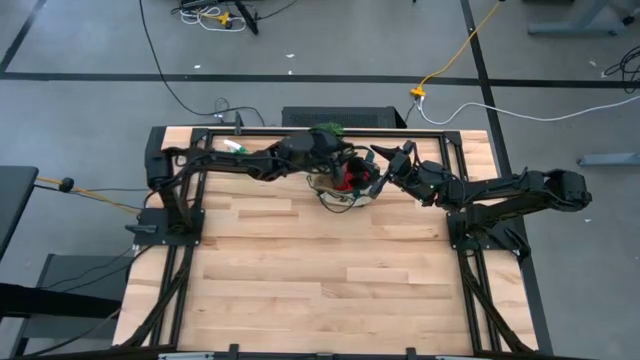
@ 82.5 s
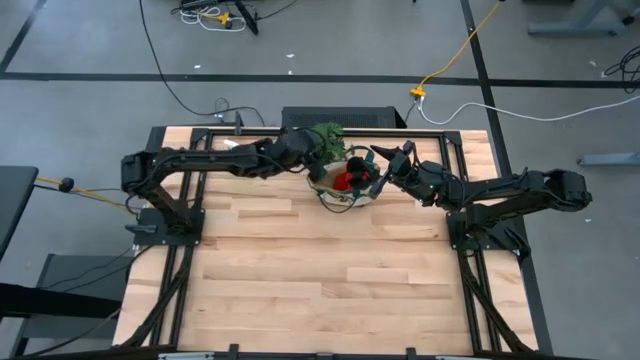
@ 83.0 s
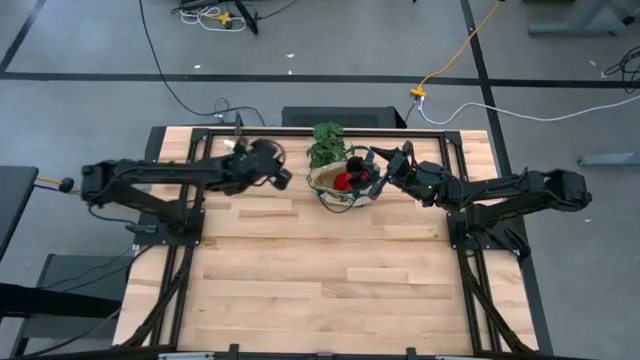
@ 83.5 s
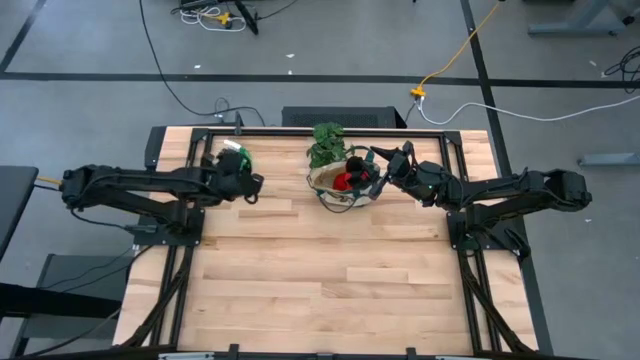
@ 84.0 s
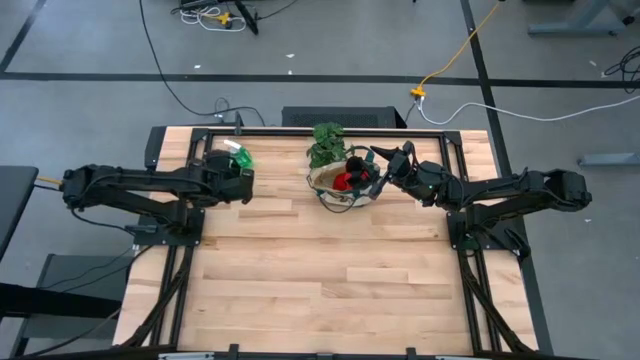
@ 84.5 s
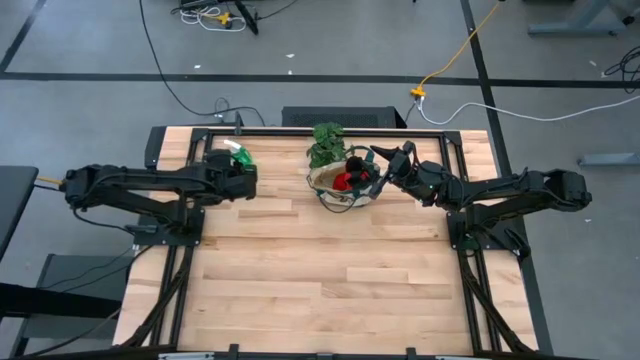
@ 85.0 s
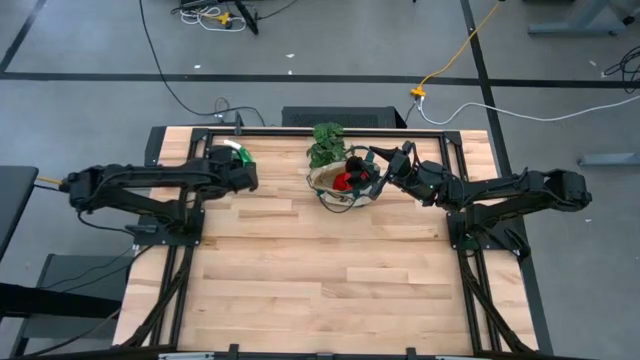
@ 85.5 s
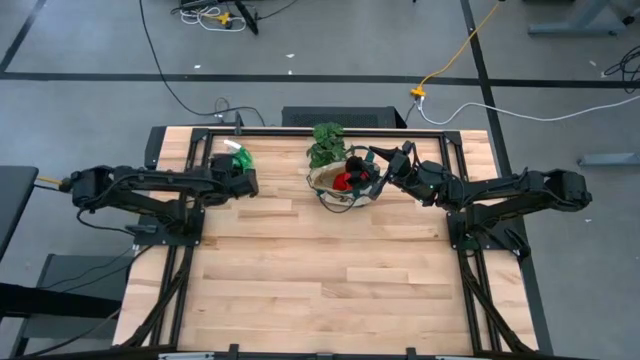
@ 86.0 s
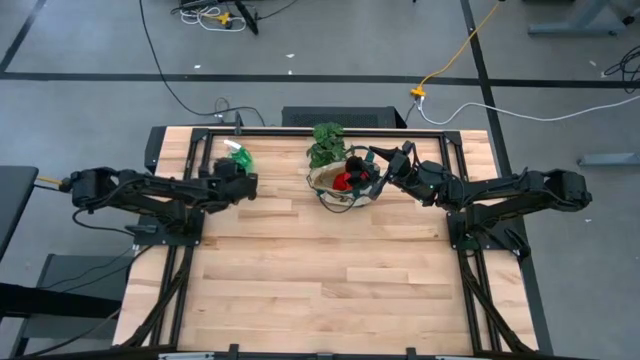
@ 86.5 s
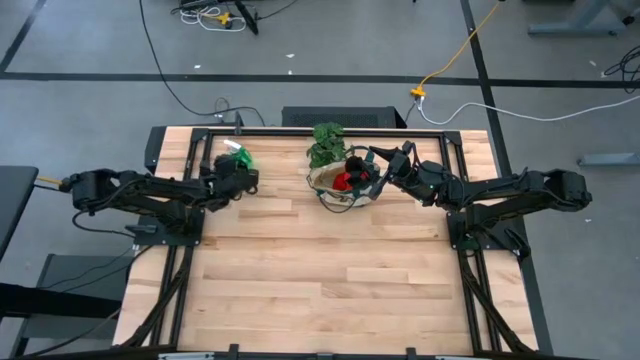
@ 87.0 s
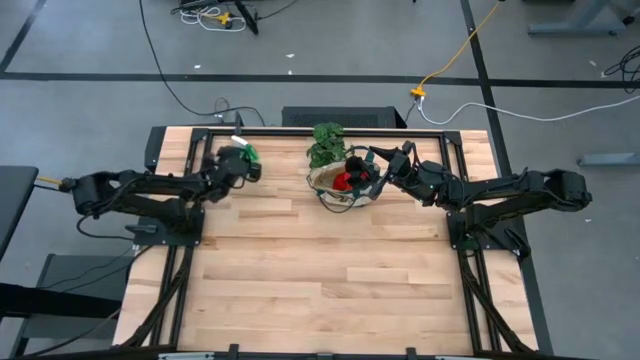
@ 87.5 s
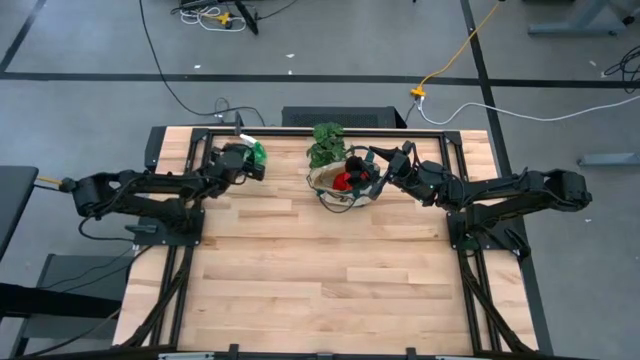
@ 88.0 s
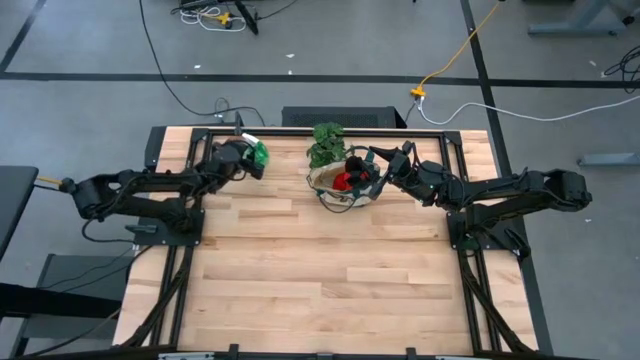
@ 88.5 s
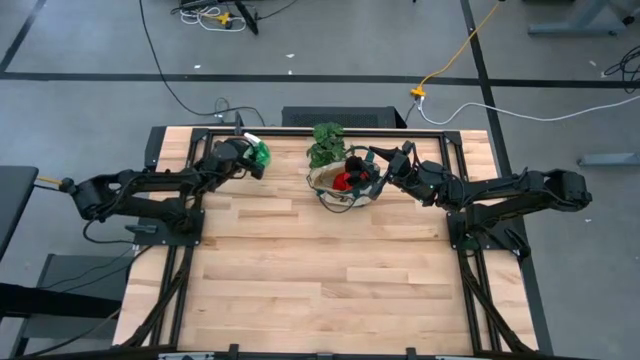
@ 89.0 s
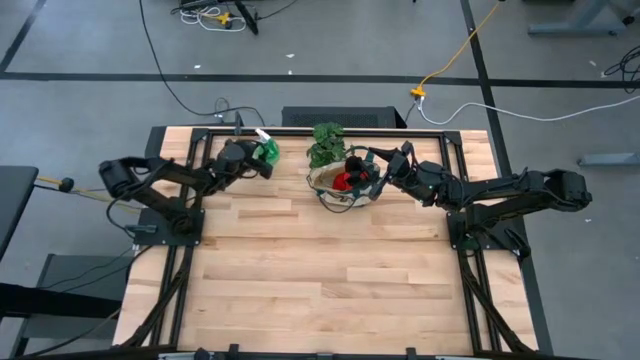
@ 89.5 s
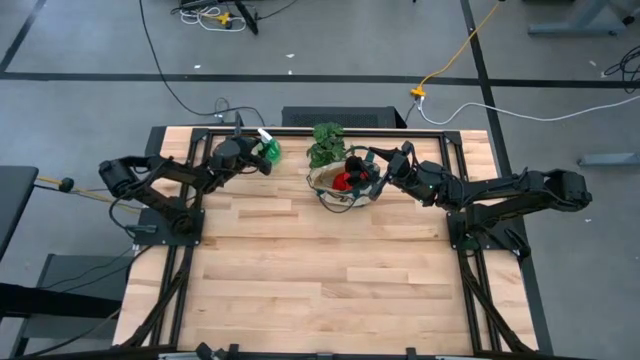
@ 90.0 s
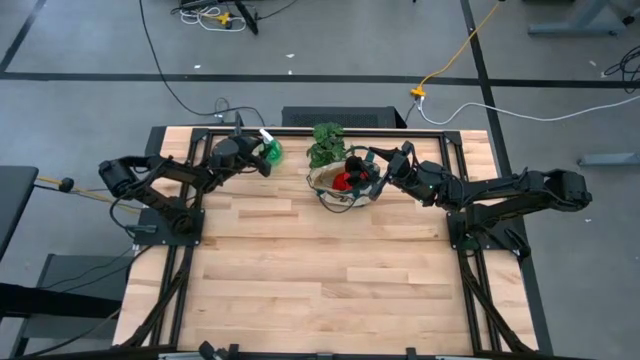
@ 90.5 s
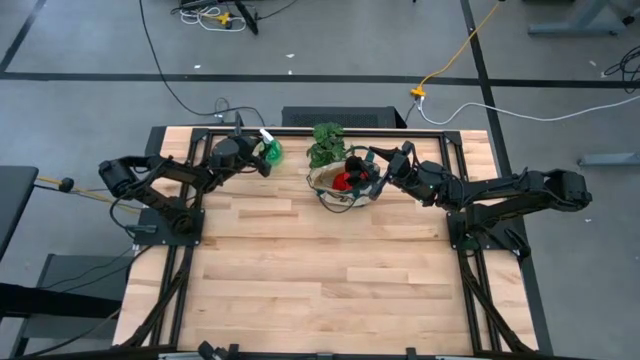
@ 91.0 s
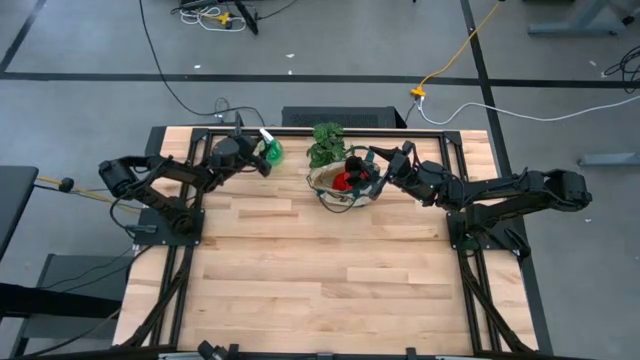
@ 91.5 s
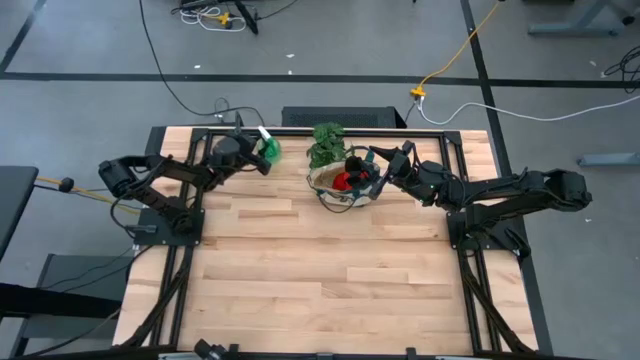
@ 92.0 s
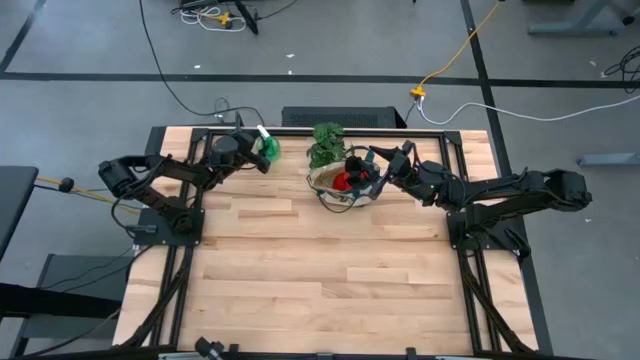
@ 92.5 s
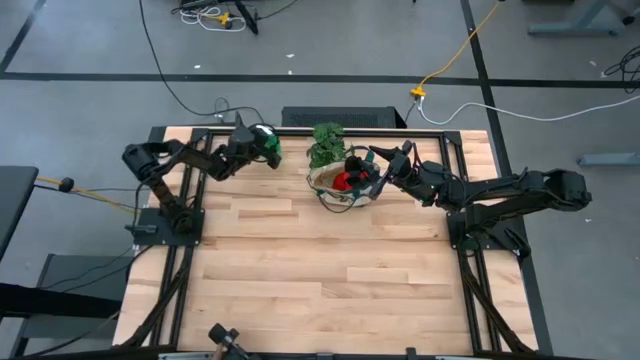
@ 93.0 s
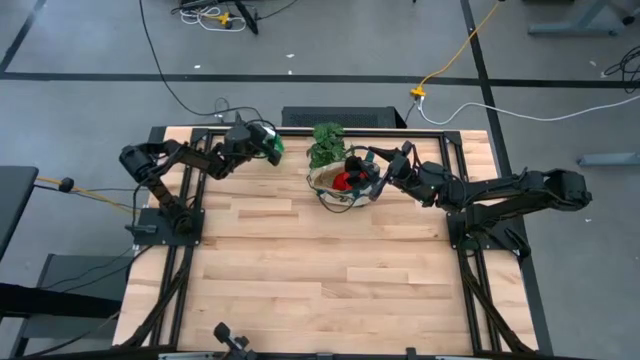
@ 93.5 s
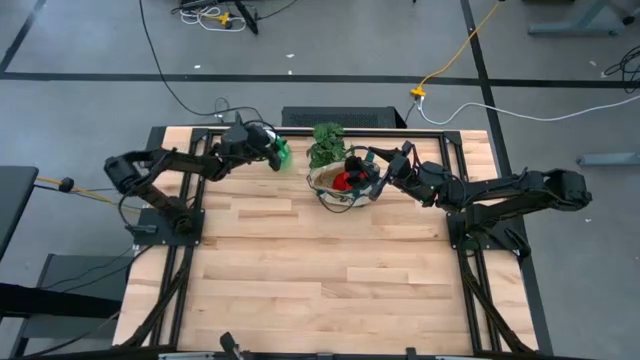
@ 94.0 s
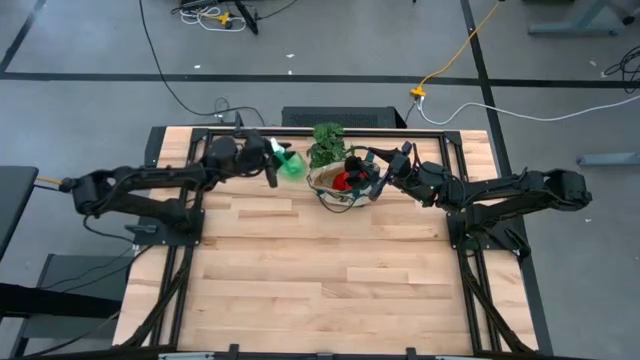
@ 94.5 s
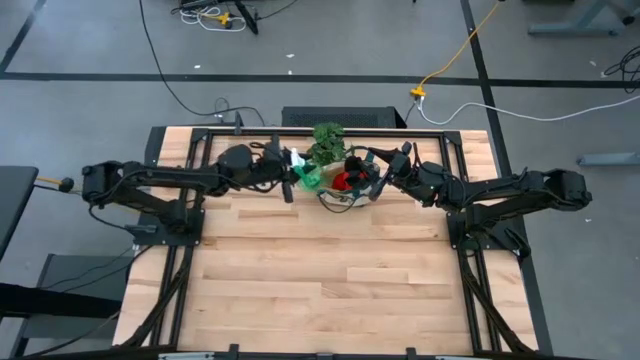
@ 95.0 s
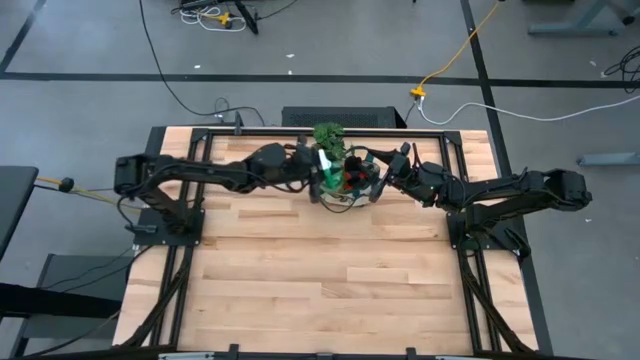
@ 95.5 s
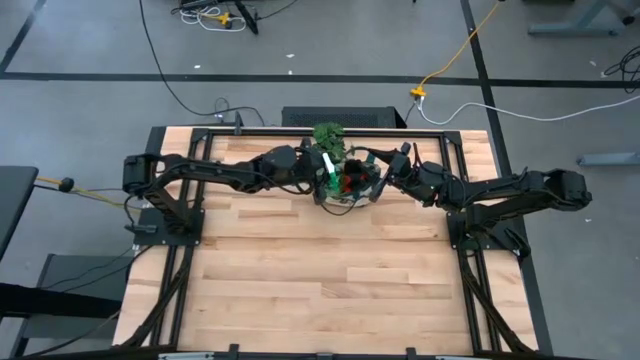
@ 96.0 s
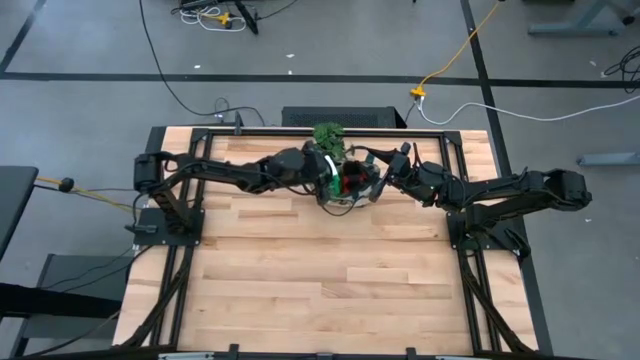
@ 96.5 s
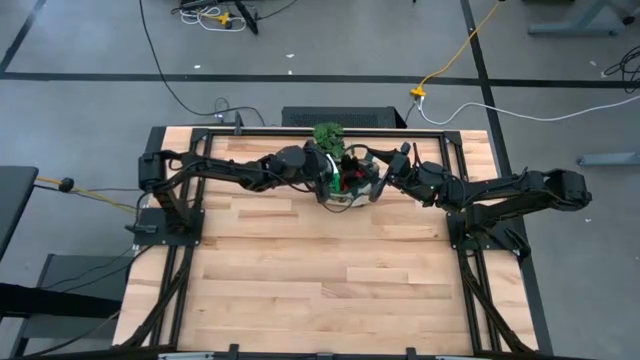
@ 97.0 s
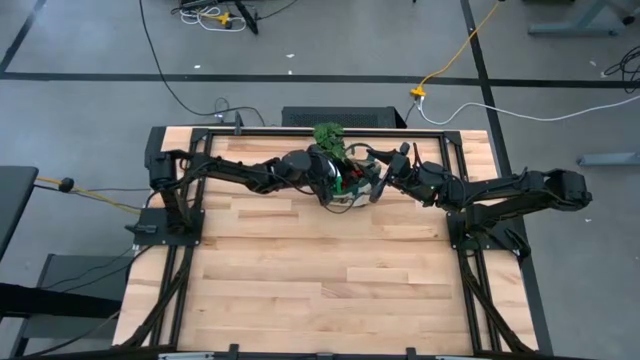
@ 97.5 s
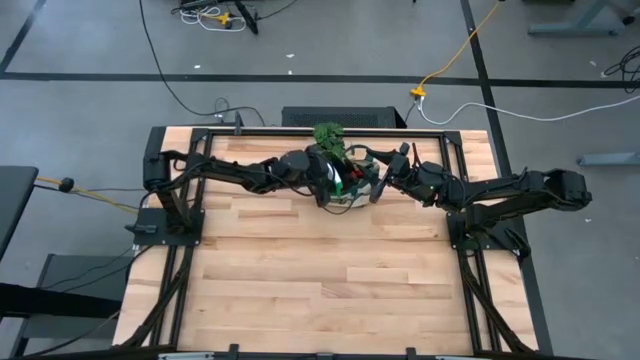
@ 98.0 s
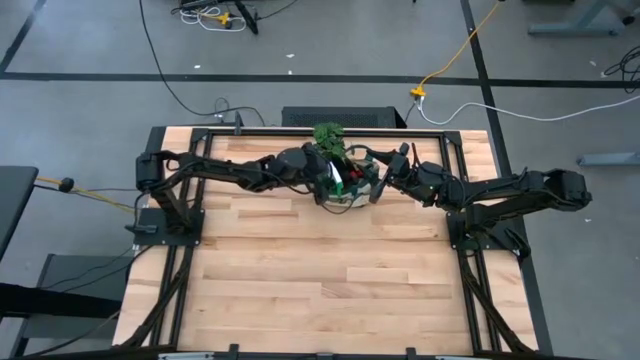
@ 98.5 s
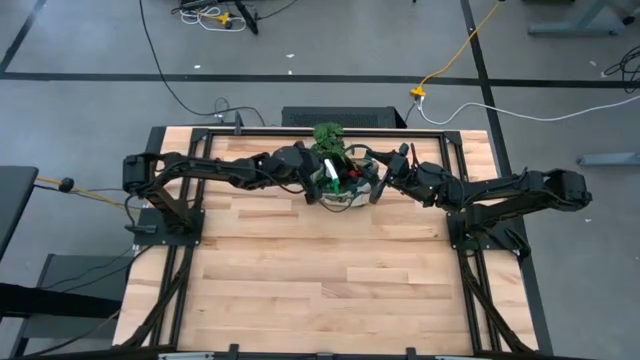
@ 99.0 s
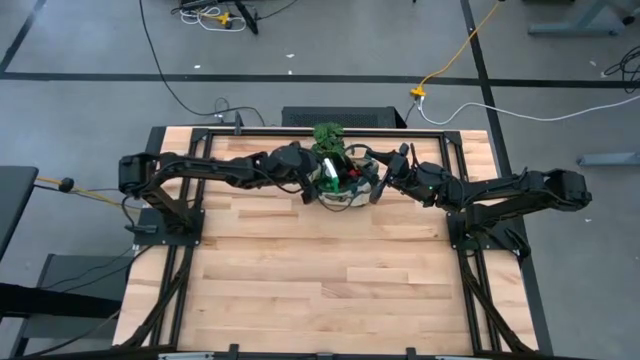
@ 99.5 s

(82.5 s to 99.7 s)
Task: Pick & Place Garden tools in Gardening bag
Put the green spray bottle into the green gardening bag

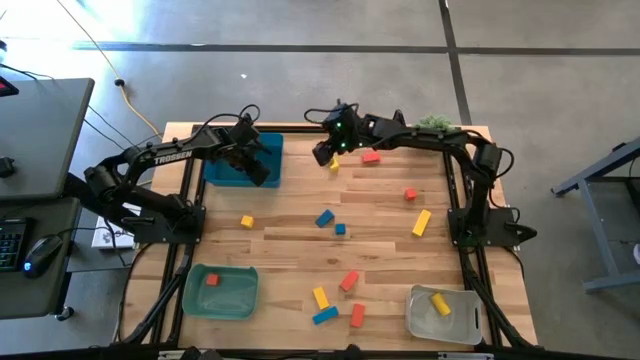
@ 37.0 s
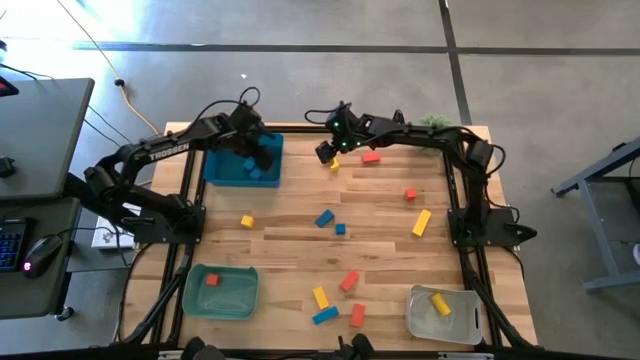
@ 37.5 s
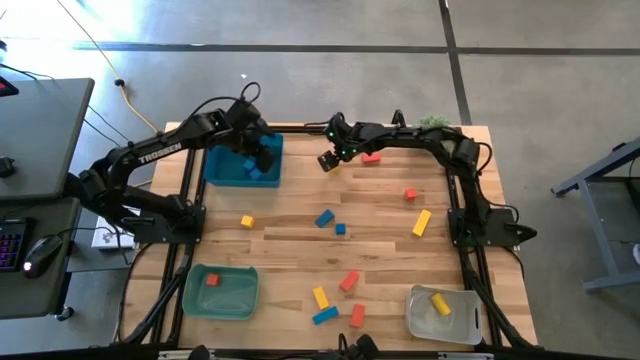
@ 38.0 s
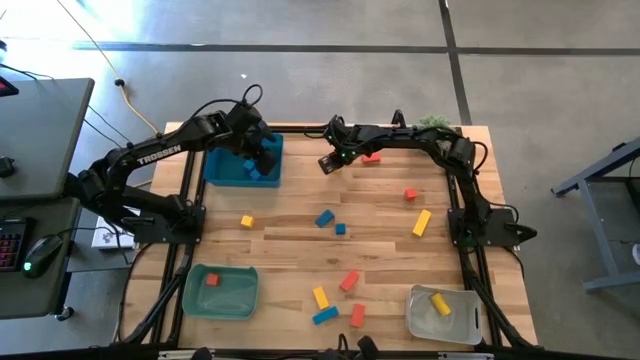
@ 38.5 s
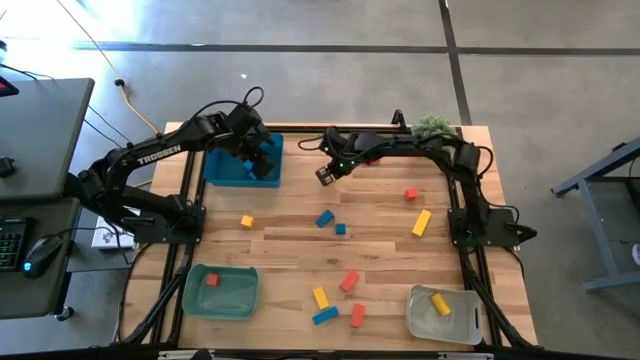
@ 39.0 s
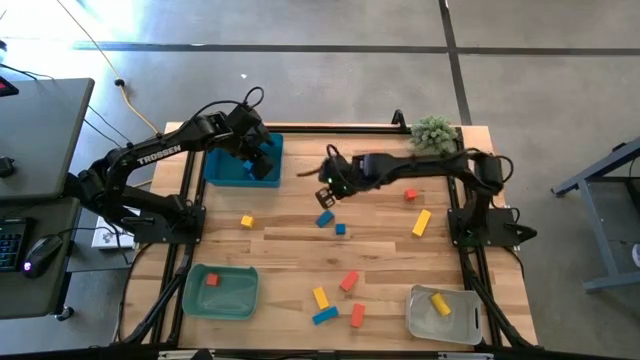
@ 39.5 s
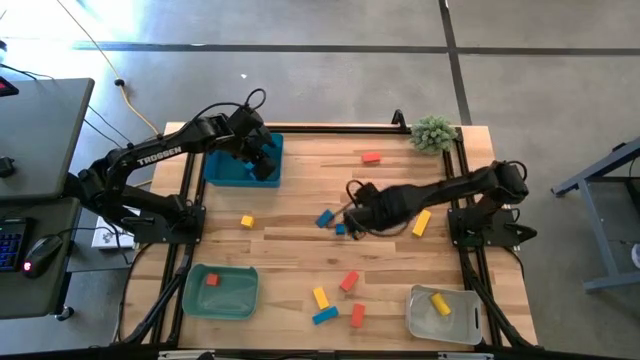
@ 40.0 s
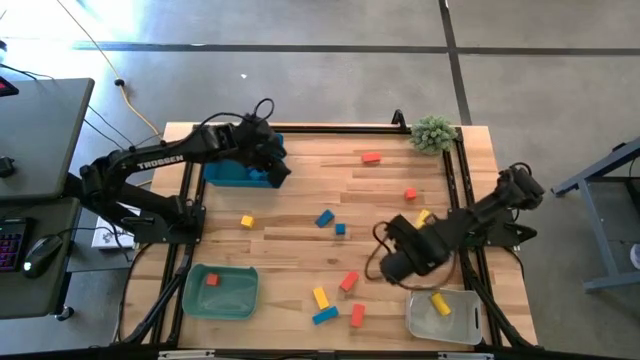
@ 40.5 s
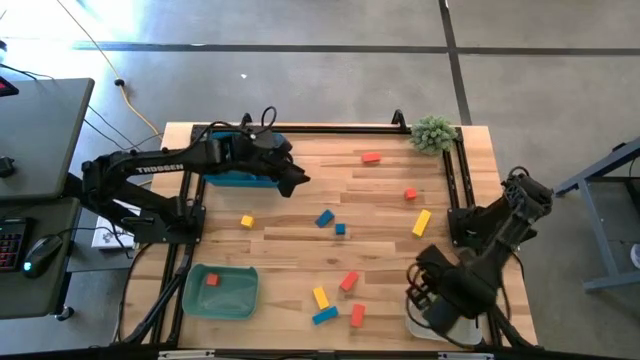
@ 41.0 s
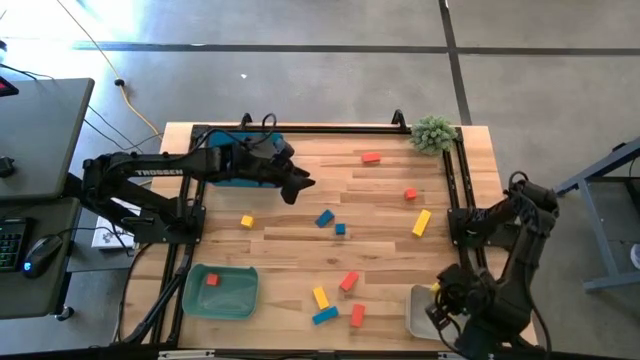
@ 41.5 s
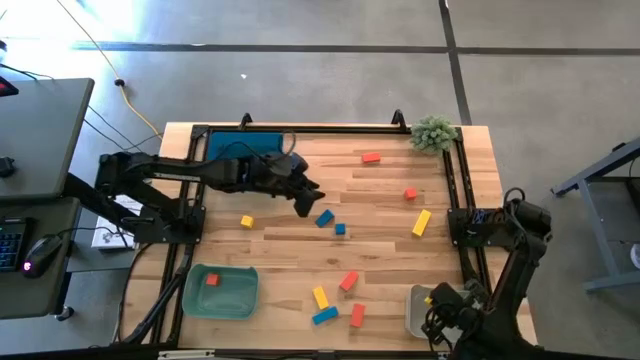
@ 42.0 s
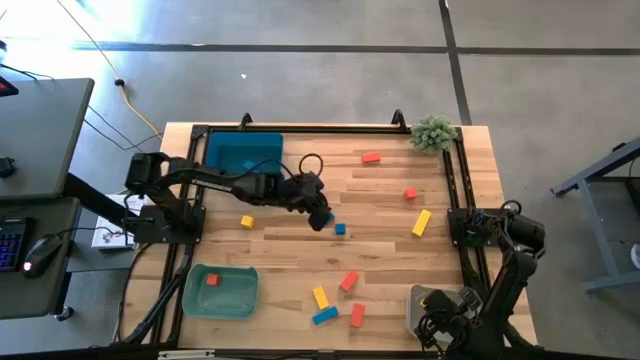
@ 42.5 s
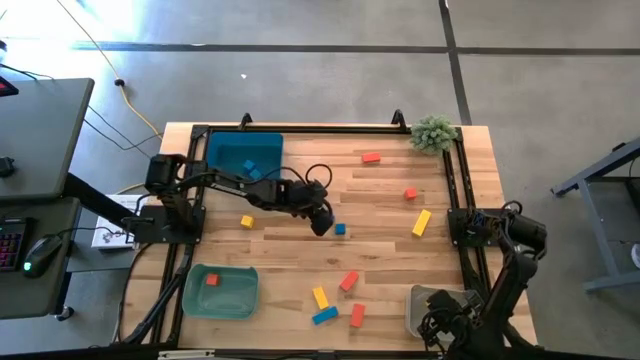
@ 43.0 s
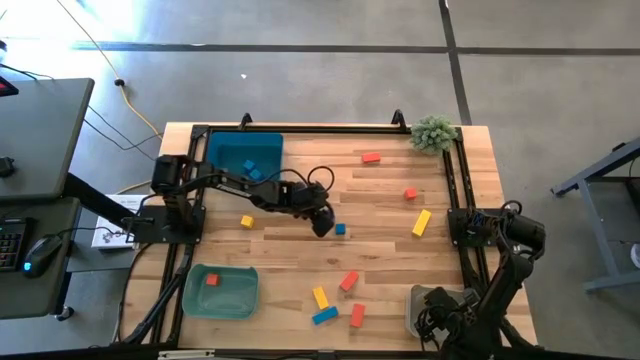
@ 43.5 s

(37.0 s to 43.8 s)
Task: Sort & place blocks by color
Put the yellow block into the gray bin
